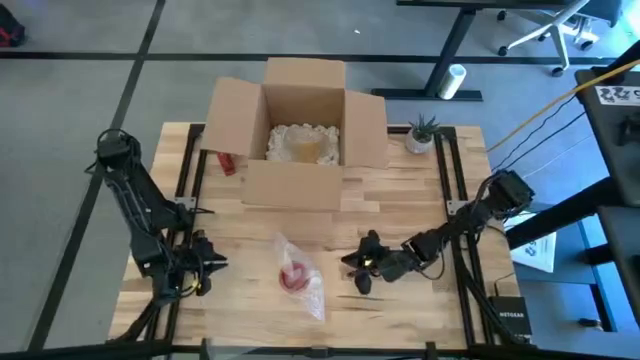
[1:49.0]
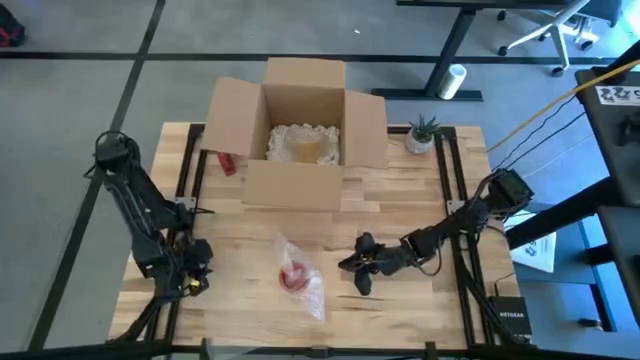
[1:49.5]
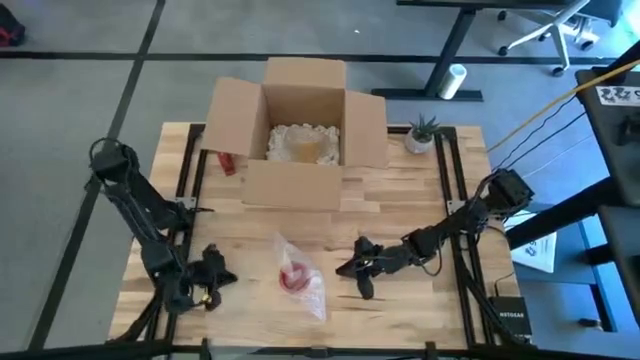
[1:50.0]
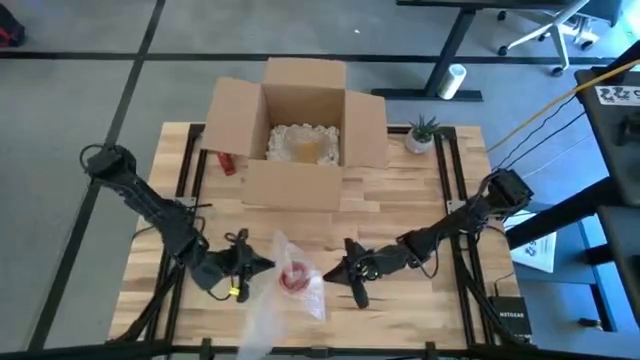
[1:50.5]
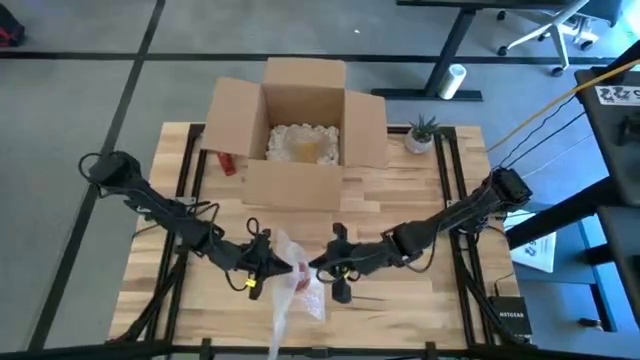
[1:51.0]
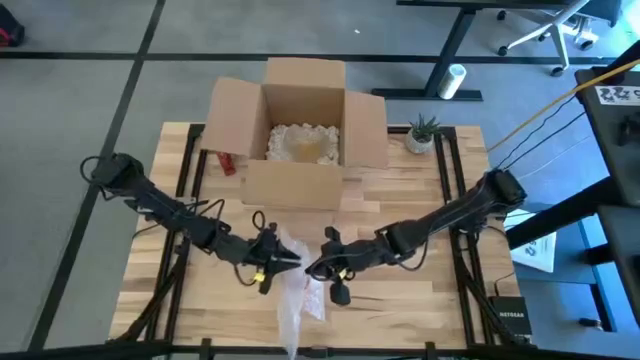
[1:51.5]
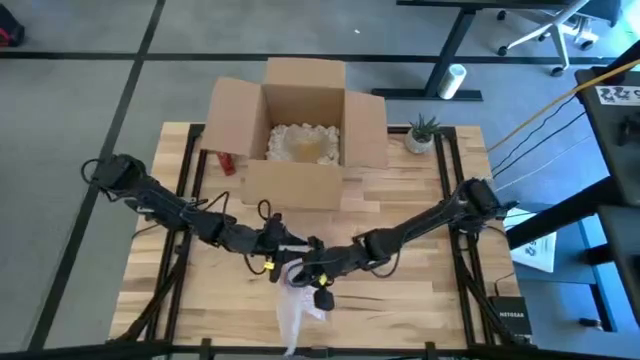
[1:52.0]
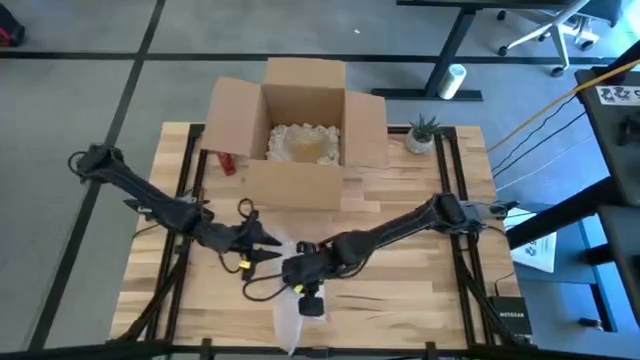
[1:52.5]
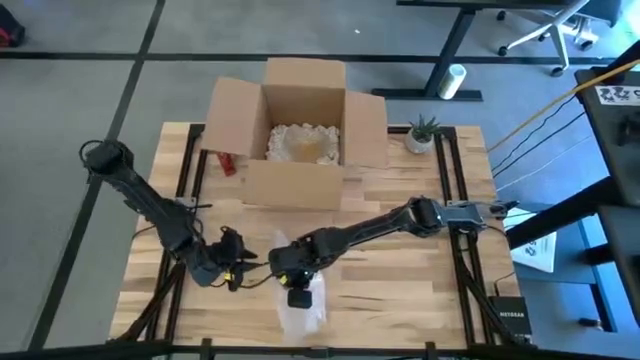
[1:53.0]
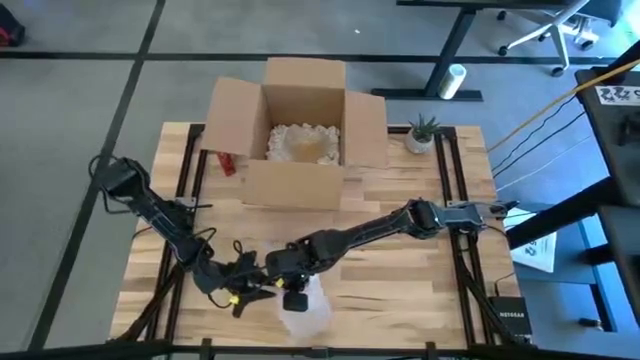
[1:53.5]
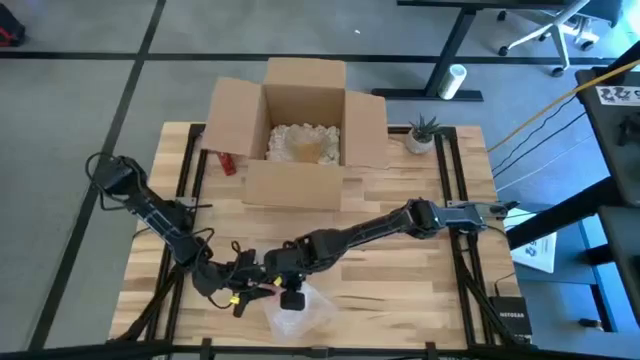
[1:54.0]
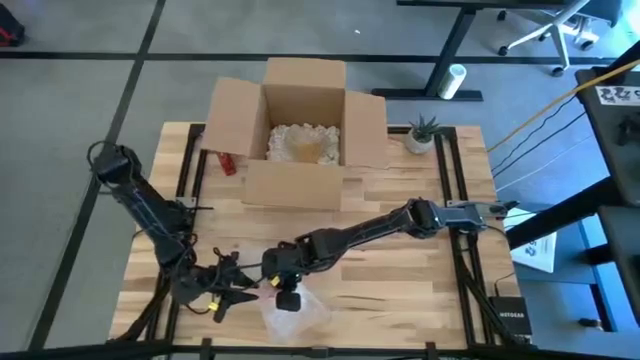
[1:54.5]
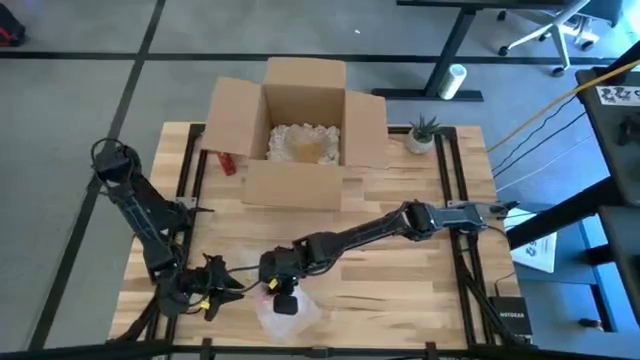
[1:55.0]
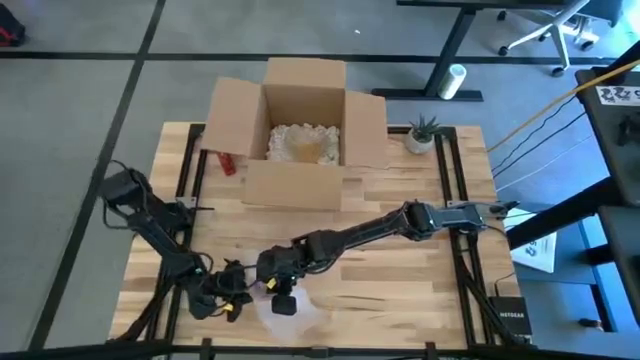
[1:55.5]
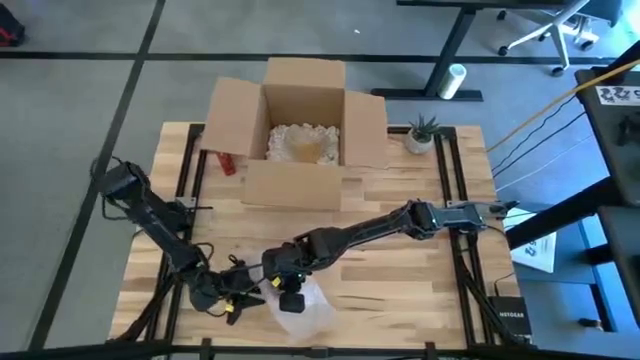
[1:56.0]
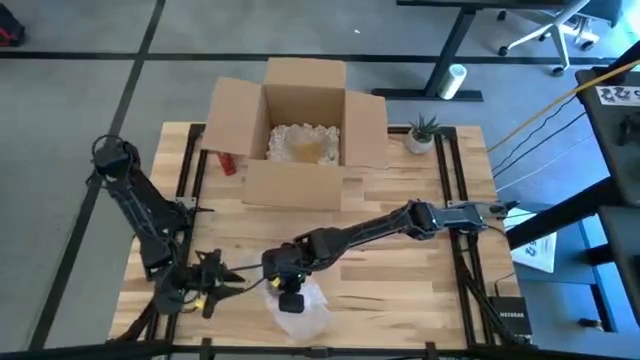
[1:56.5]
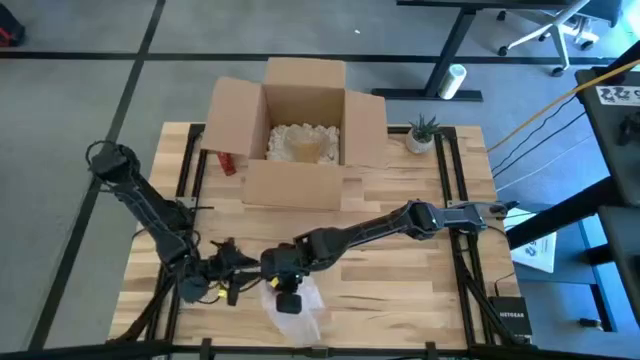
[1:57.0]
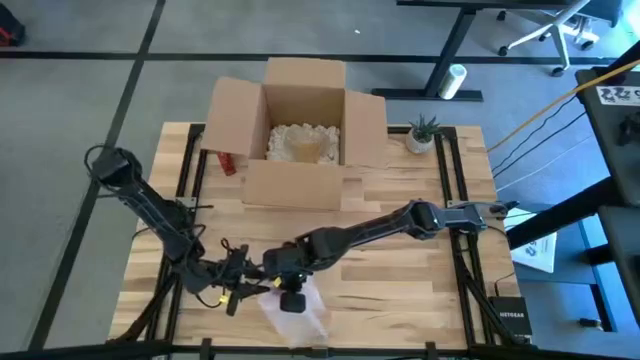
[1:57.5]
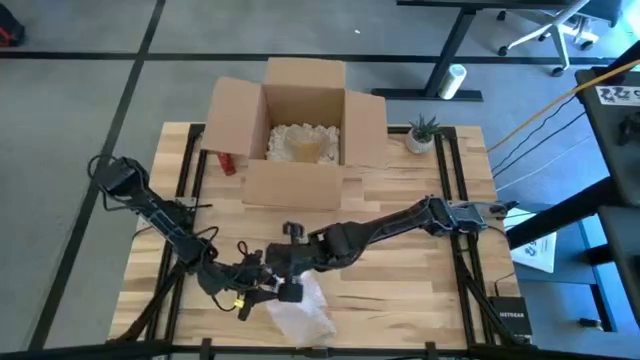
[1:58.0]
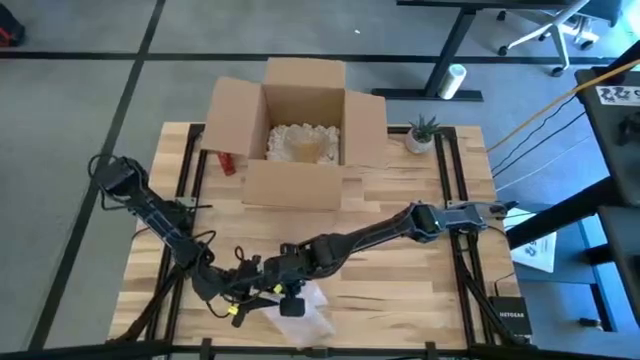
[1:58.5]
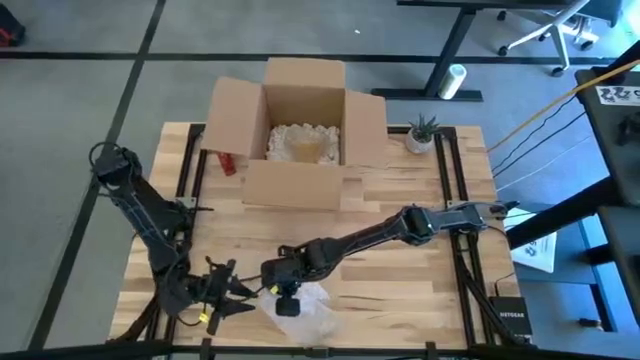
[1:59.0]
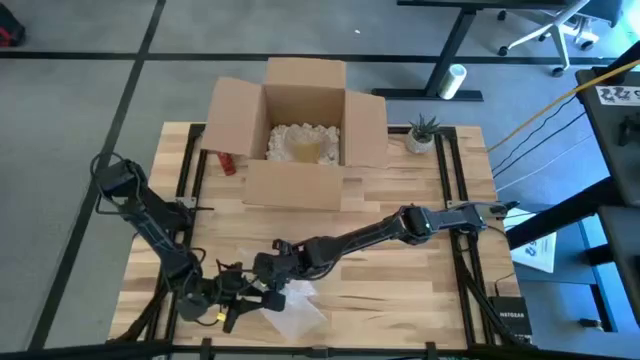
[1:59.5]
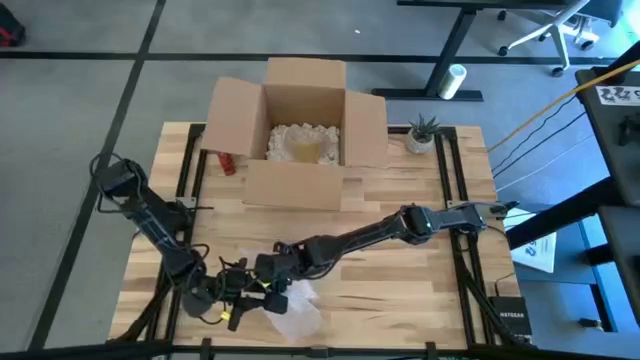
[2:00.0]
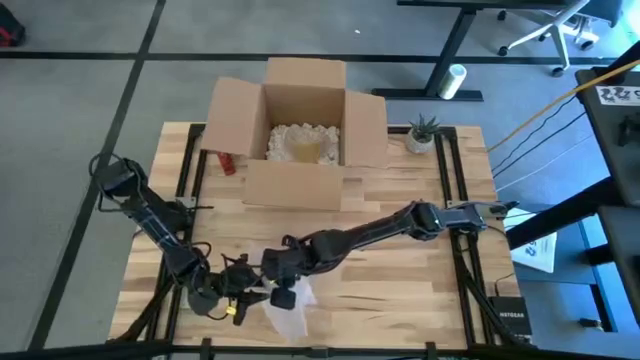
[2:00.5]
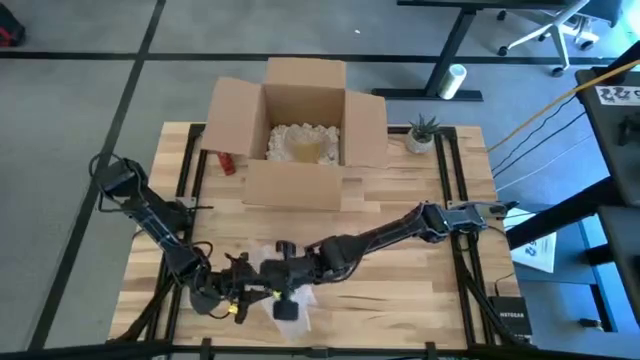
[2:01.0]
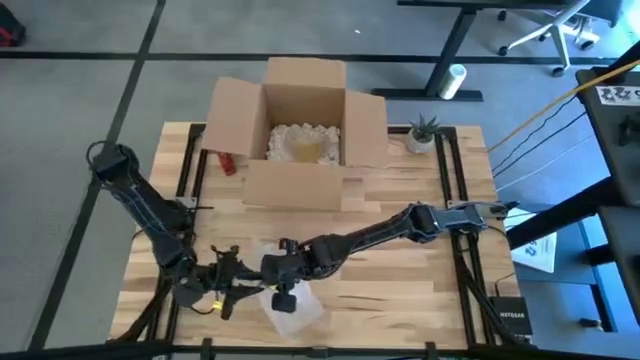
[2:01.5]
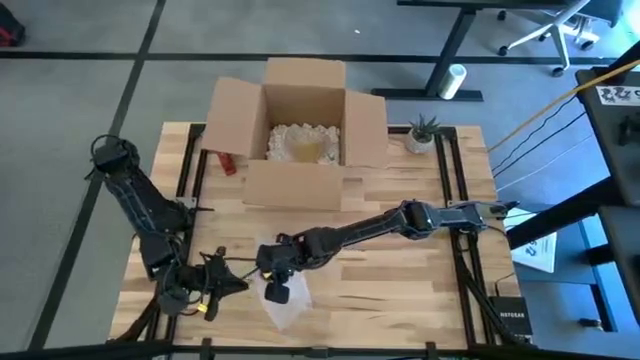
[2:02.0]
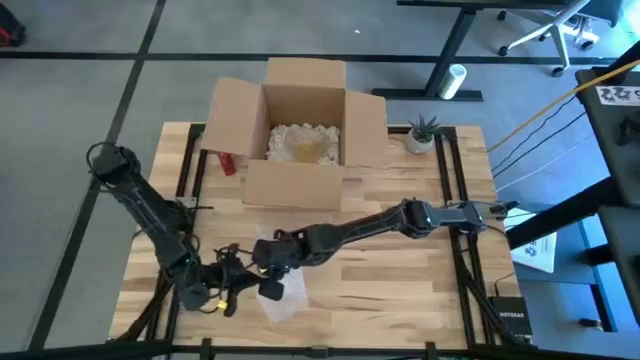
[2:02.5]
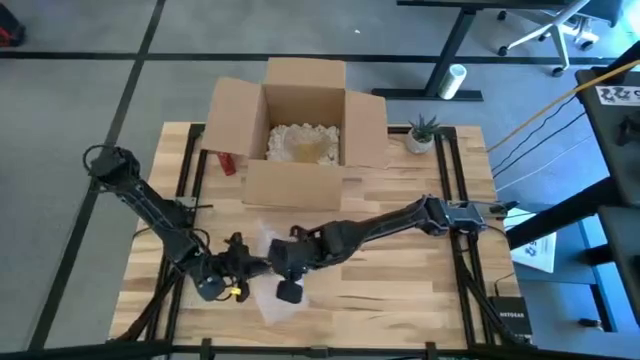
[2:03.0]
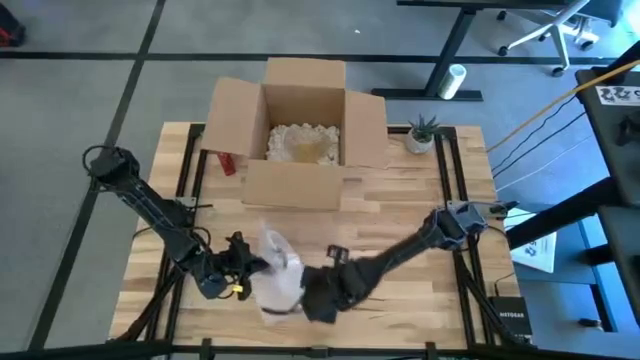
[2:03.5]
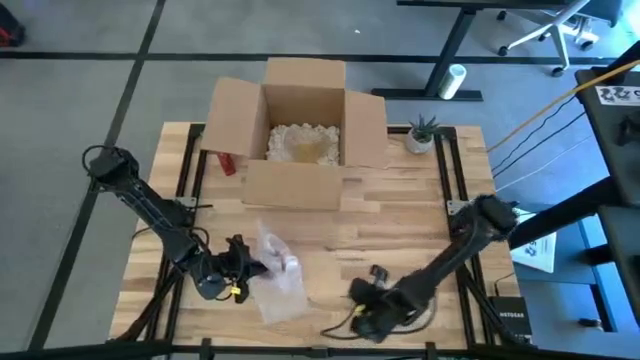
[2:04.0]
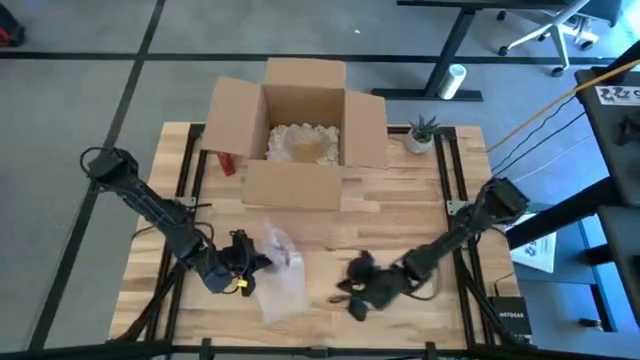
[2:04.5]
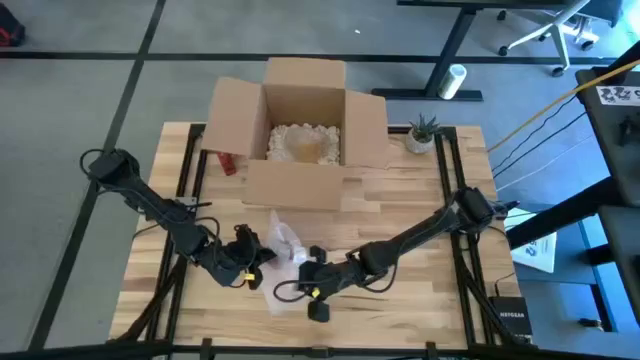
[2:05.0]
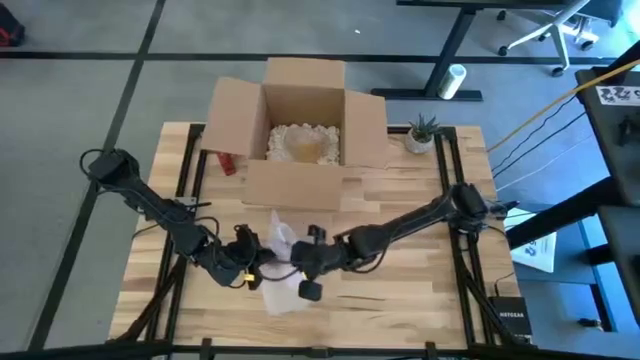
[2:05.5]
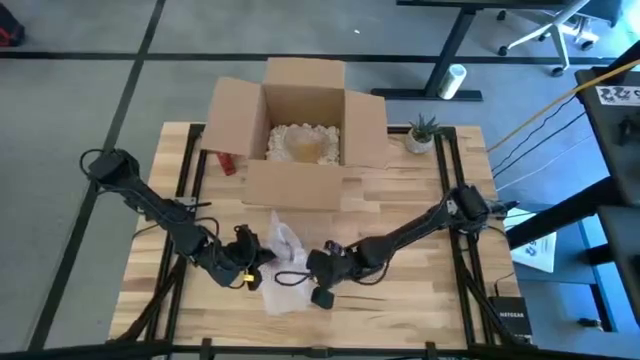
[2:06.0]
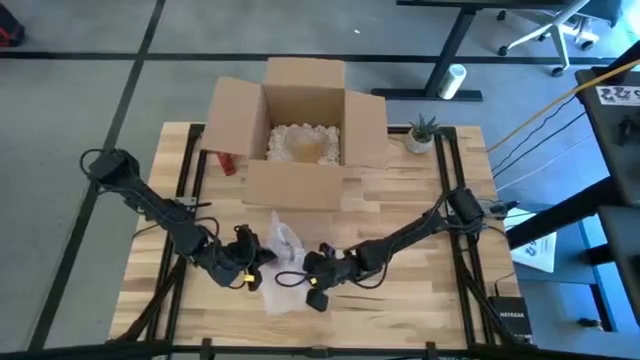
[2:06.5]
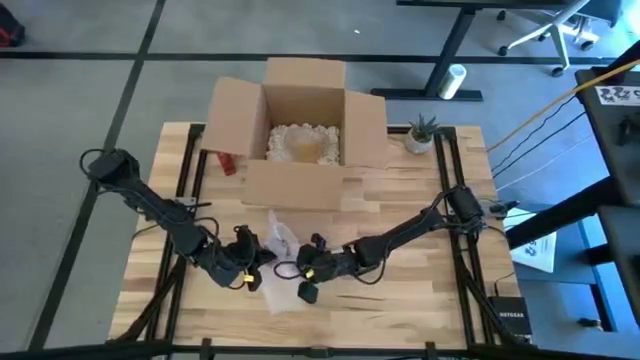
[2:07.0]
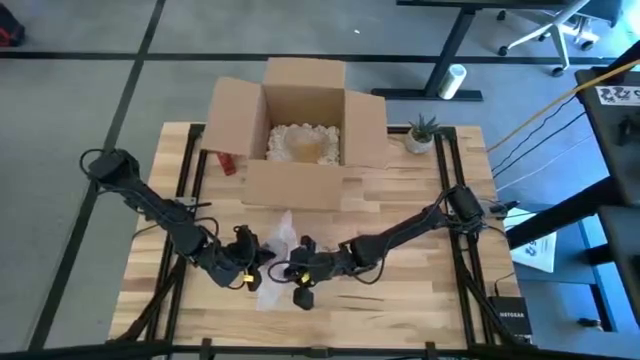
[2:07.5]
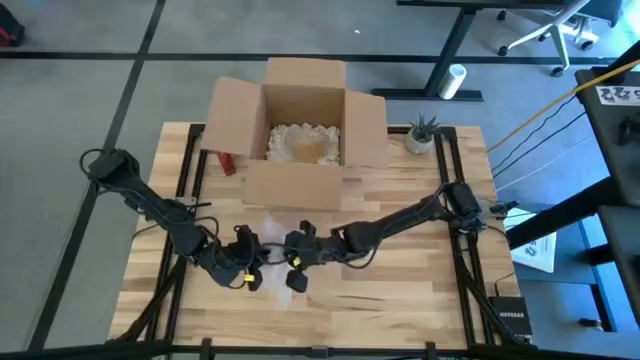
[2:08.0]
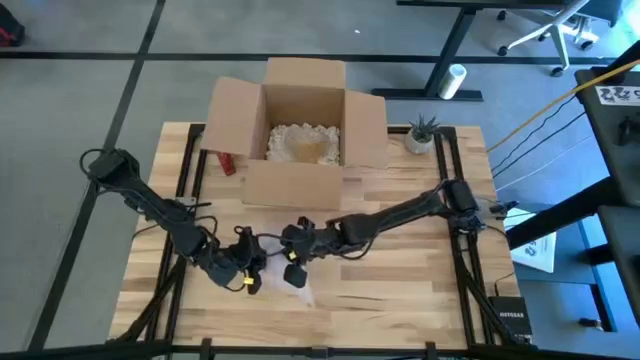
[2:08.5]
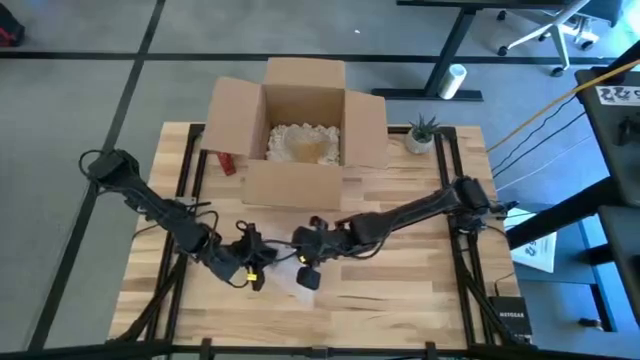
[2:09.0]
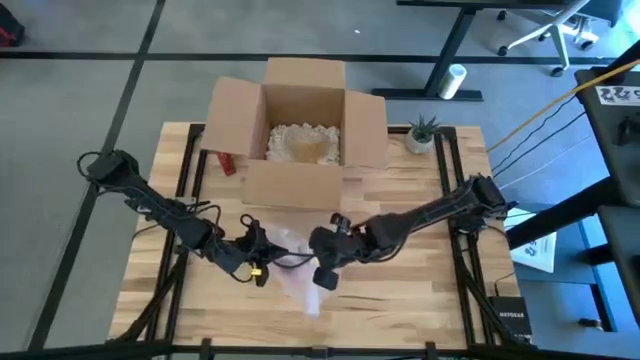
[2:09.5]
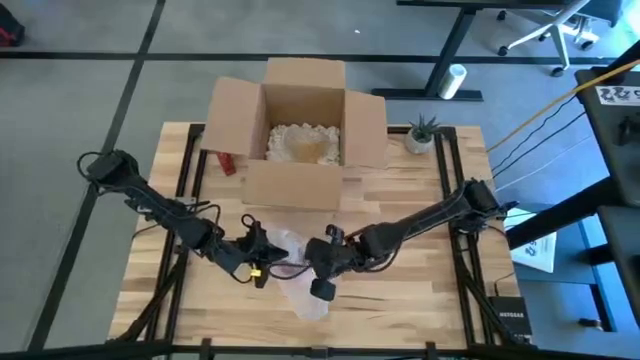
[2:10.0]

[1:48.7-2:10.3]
Task: wrap mug
Wrap the red mug with bubble wrap
